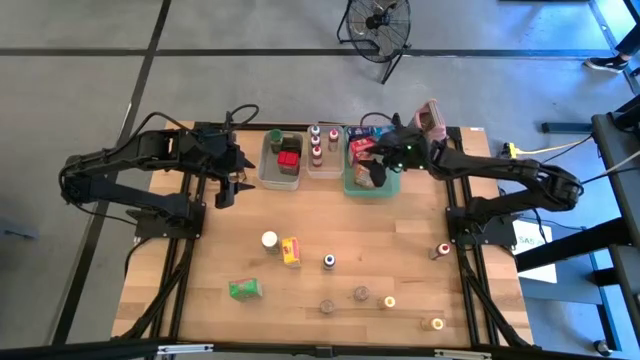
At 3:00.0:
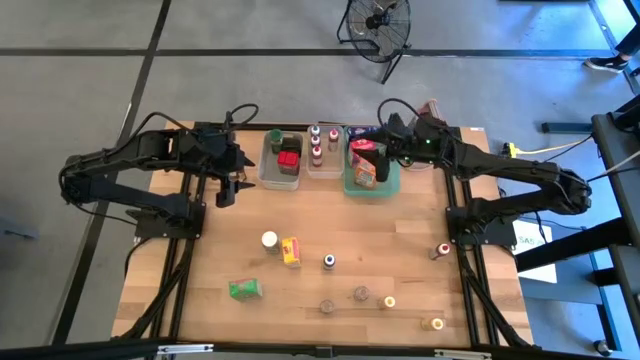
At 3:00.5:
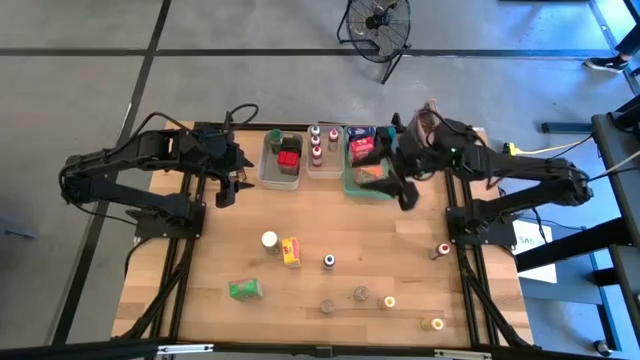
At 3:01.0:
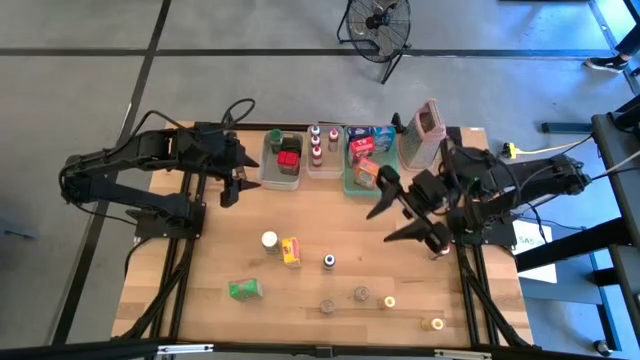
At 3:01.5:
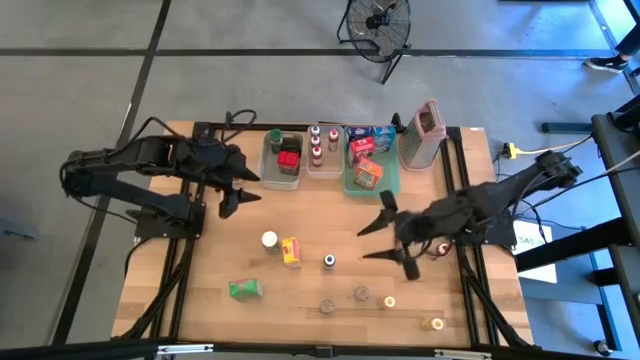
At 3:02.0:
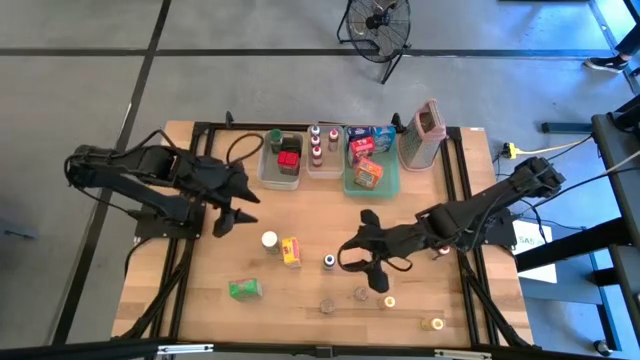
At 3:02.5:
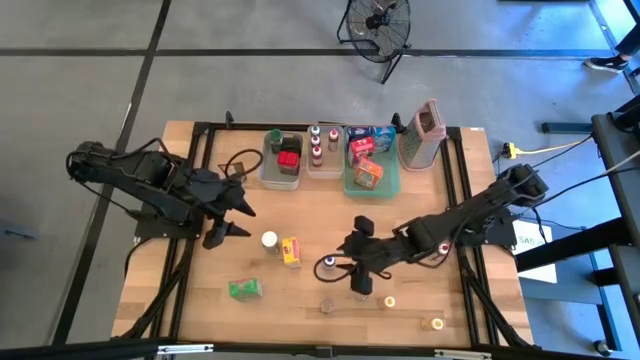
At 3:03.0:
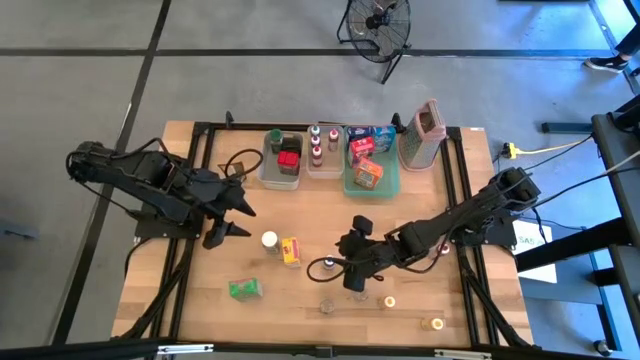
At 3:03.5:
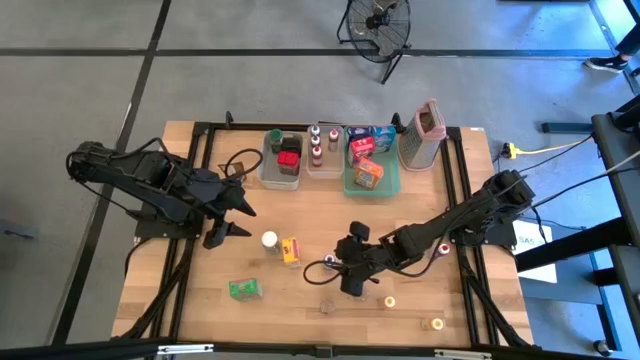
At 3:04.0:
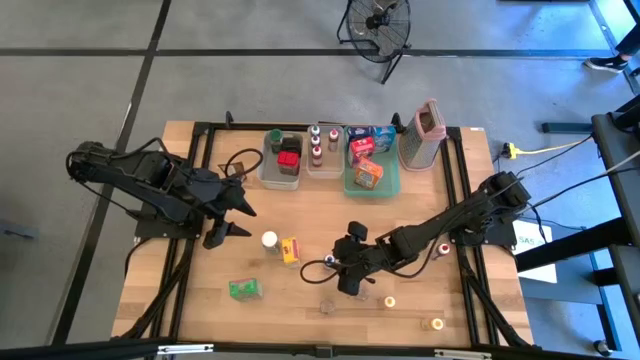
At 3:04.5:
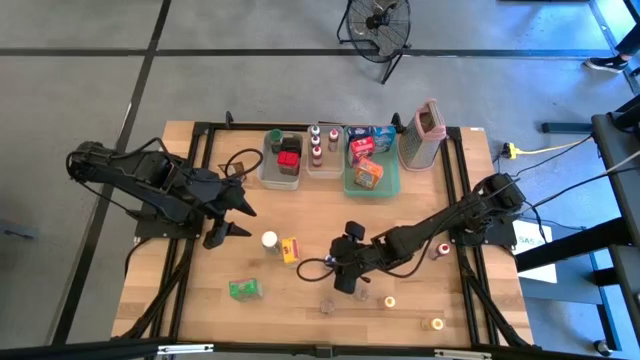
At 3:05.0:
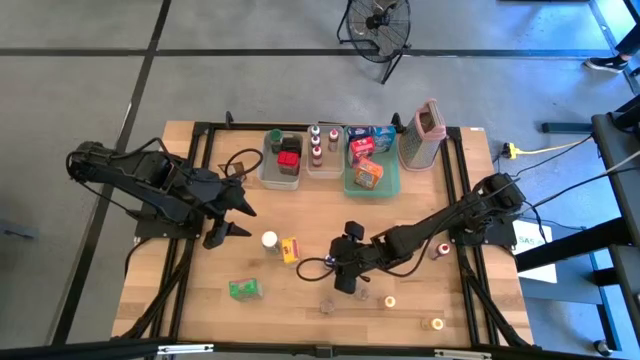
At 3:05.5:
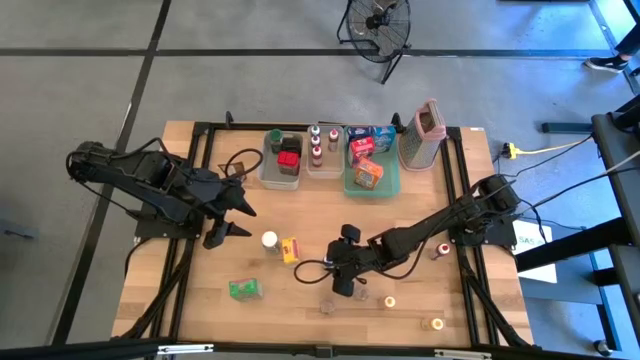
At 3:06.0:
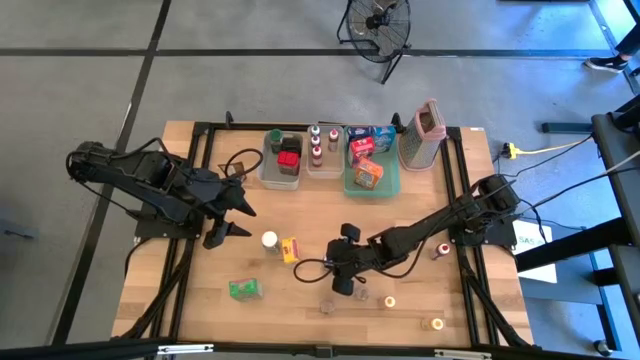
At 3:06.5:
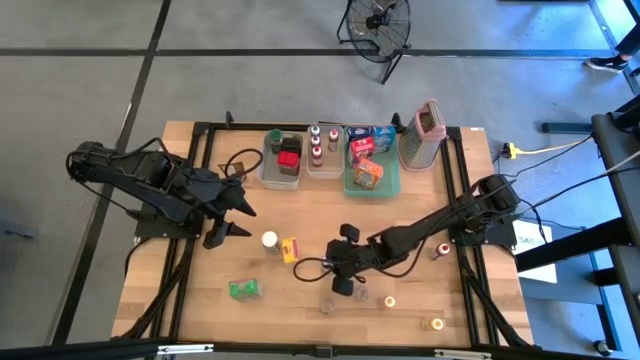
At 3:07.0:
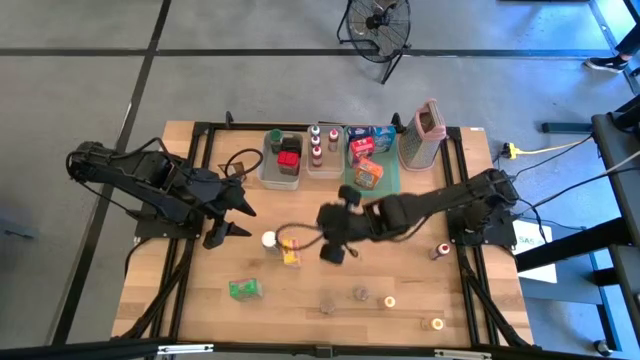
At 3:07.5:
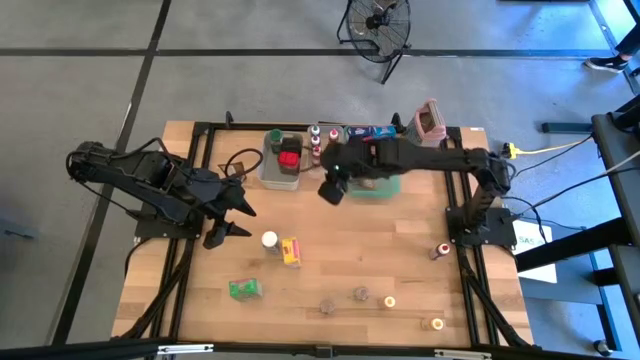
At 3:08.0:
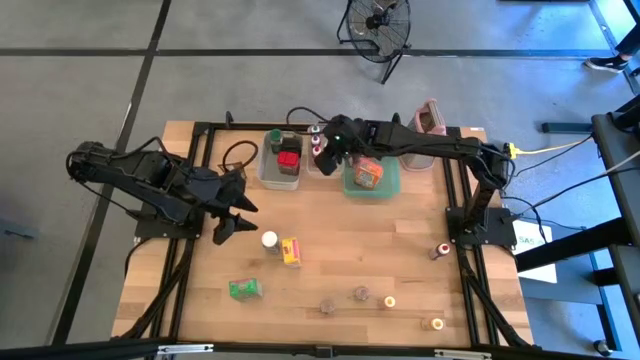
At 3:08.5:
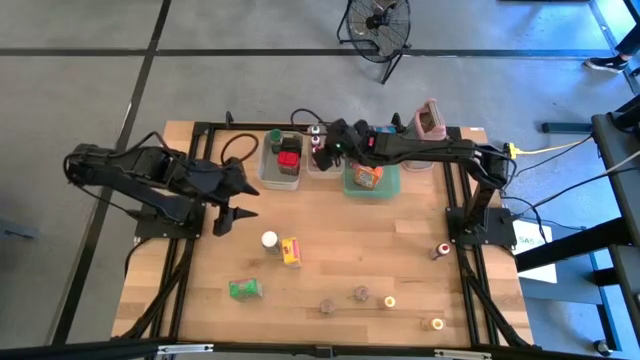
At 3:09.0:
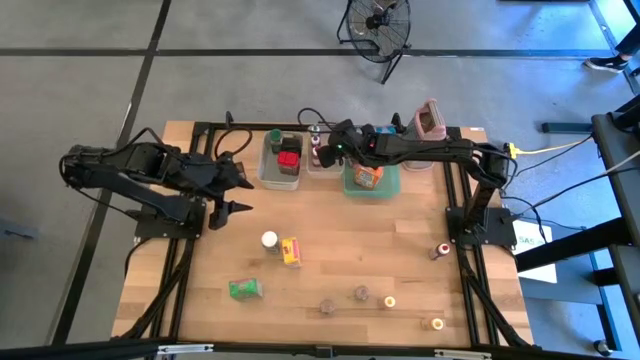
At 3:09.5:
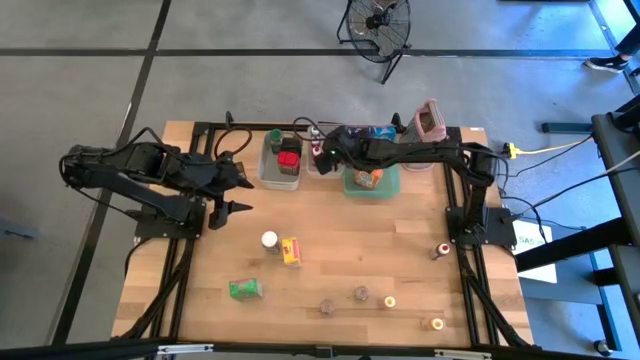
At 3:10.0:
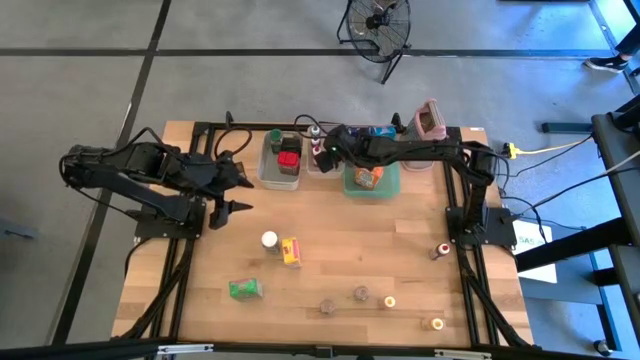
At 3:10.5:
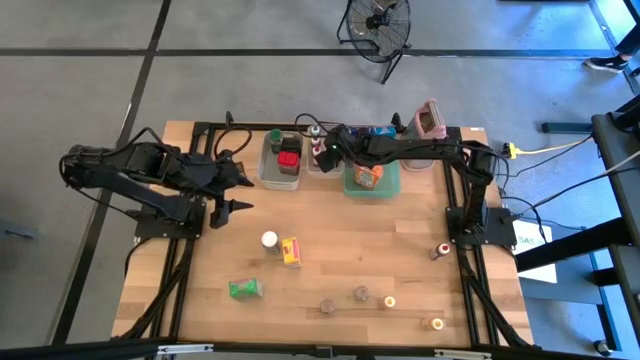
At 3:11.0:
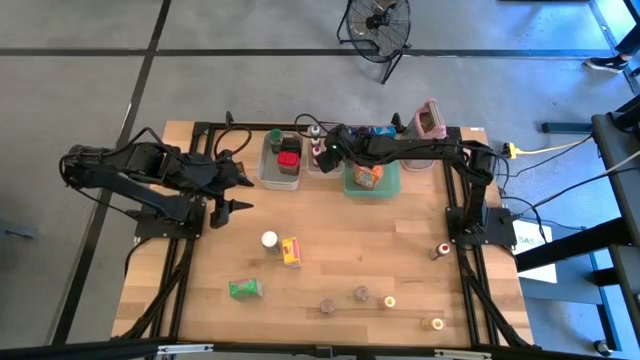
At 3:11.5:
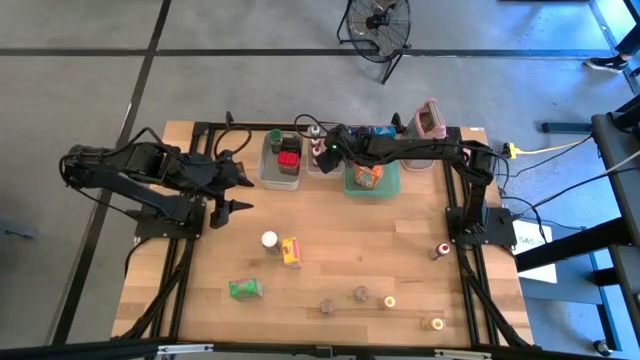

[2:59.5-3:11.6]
Task: Pick & Place Kitchen Items
Put the blue food coloring bottle into the transparent bin

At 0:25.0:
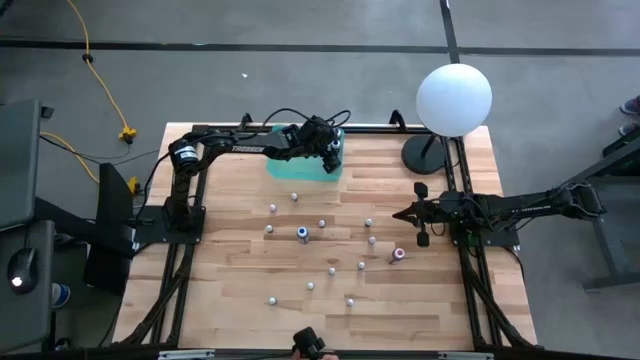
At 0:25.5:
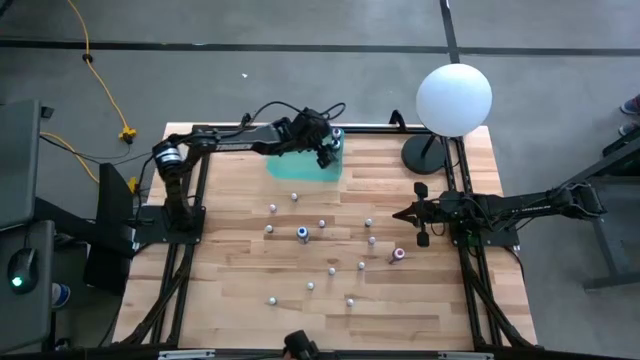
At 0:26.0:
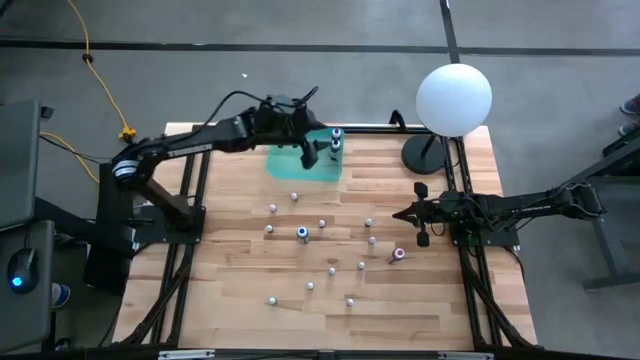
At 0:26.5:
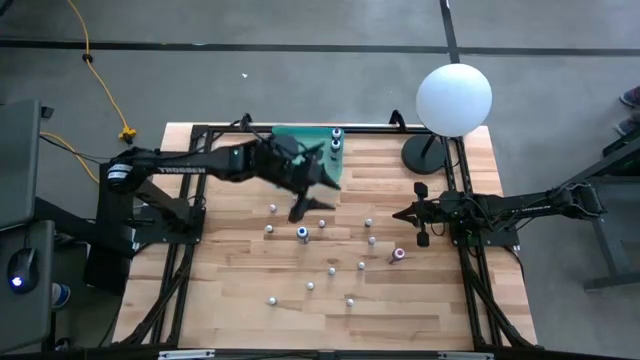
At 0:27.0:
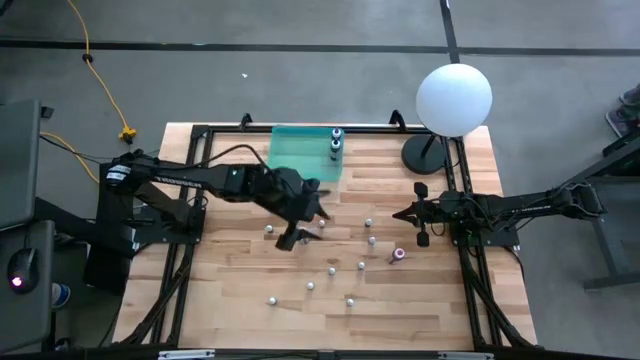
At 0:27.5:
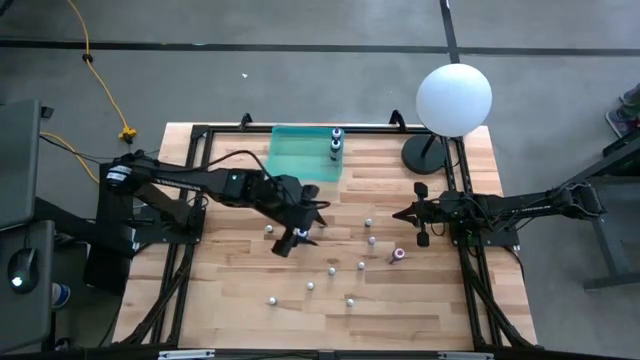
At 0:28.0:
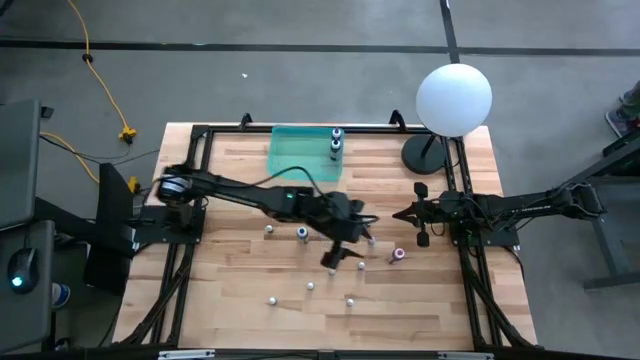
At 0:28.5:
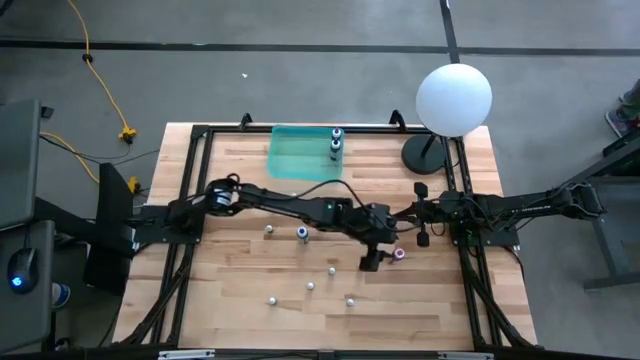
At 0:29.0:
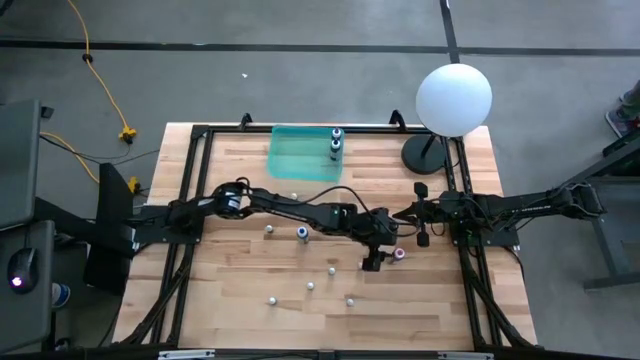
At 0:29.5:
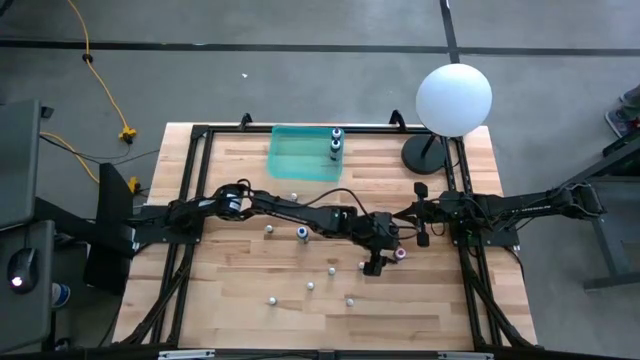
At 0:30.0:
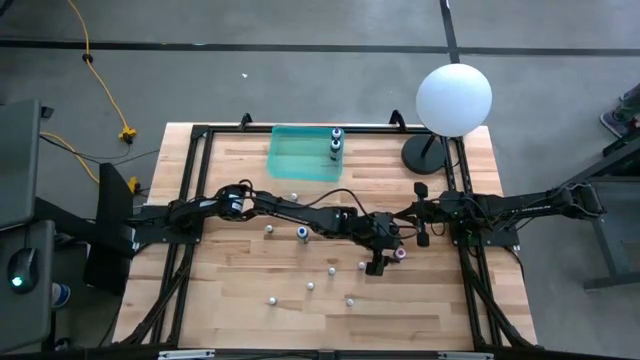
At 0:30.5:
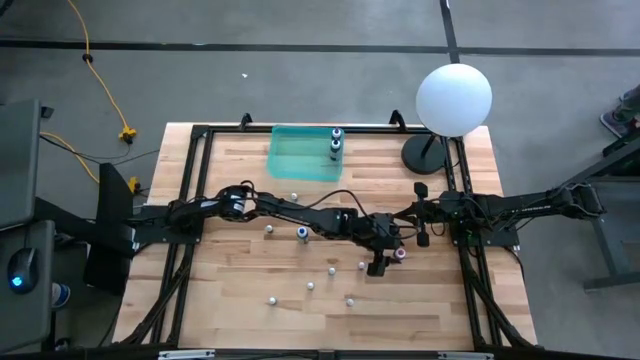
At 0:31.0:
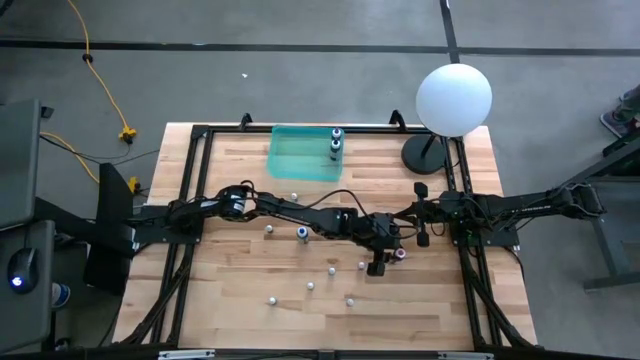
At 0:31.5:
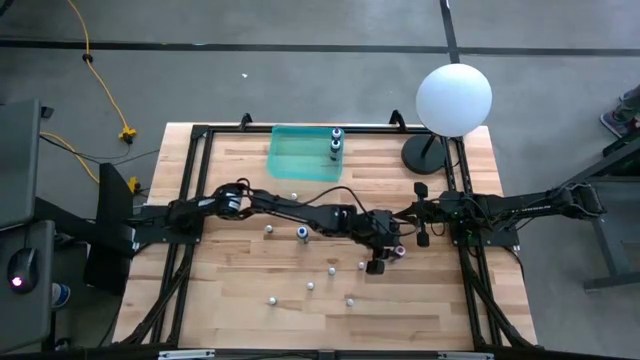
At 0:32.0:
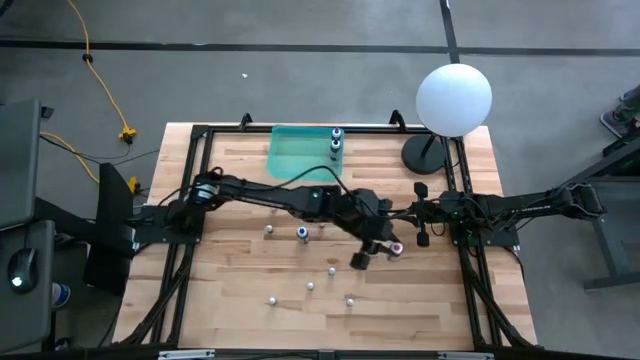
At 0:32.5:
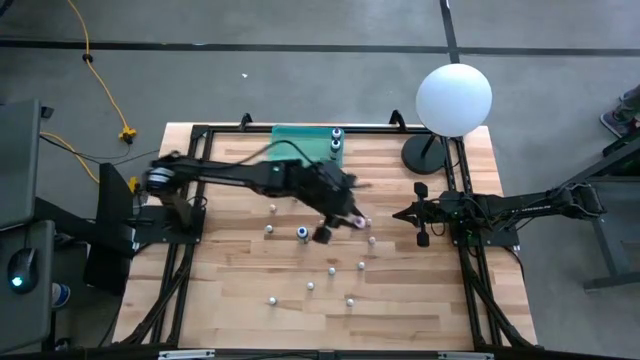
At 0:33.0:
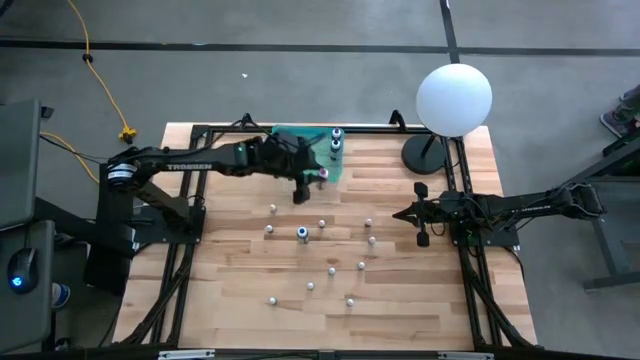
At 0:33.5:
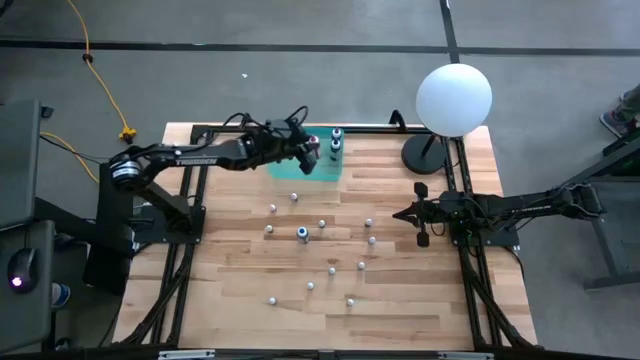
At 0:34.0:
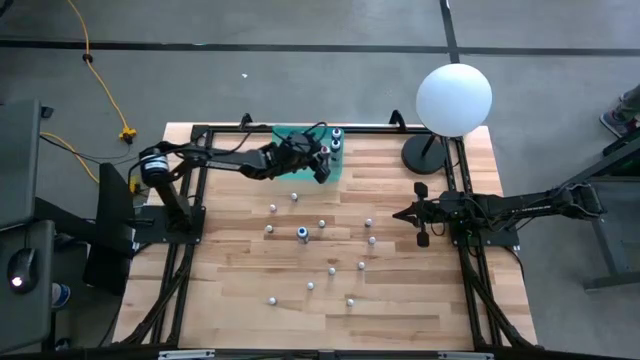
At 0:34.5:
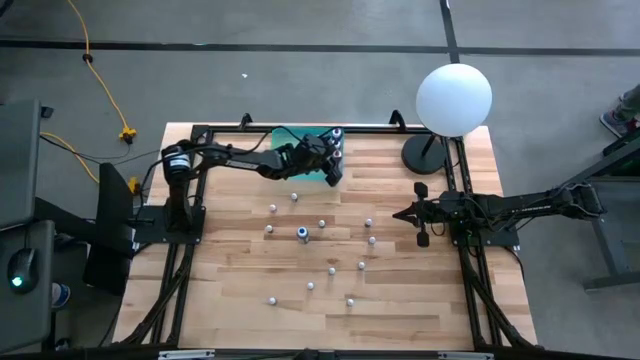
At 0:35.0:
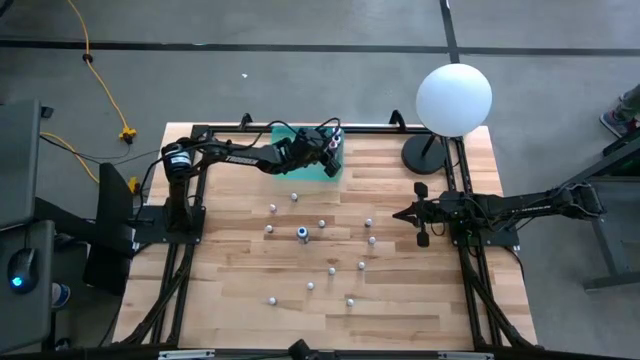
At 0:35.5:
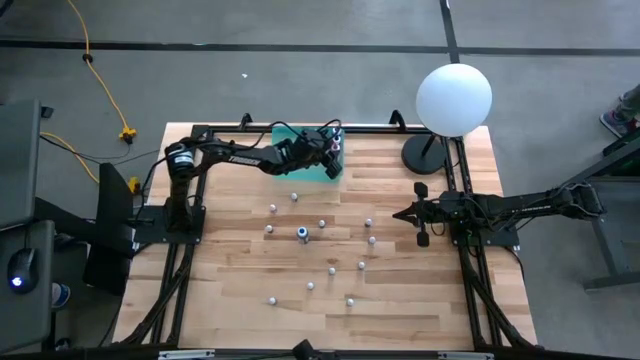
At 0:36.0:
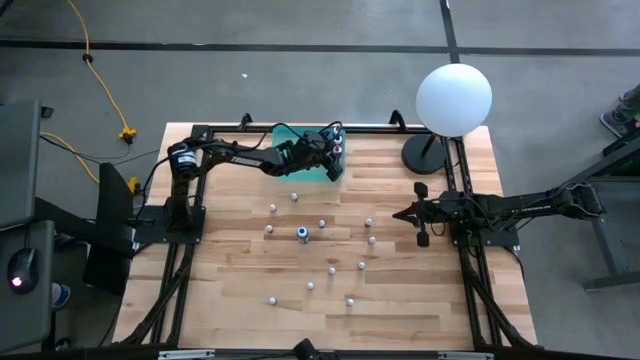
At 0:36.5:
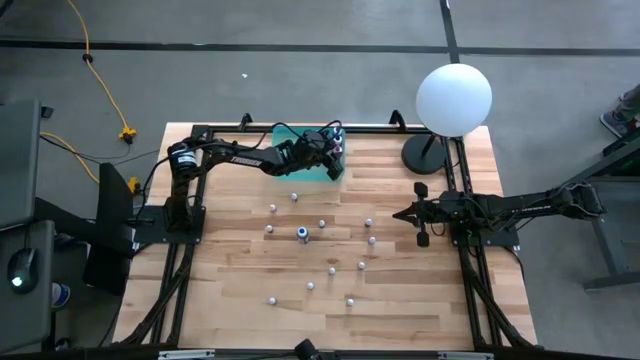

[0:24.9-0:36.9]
Task: Pick & Place food coloring
Put the big pink food coloring bottle into the blue transparent bin
